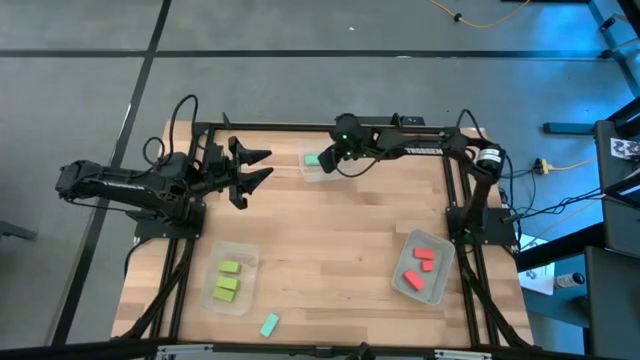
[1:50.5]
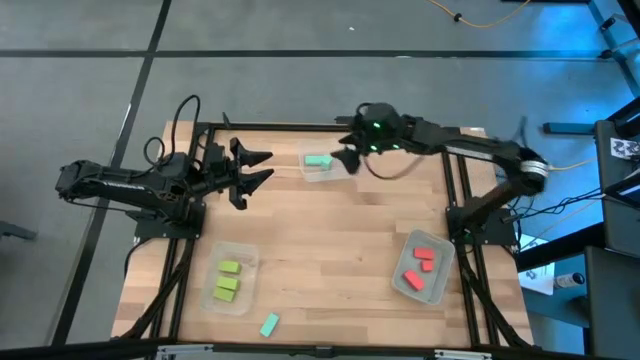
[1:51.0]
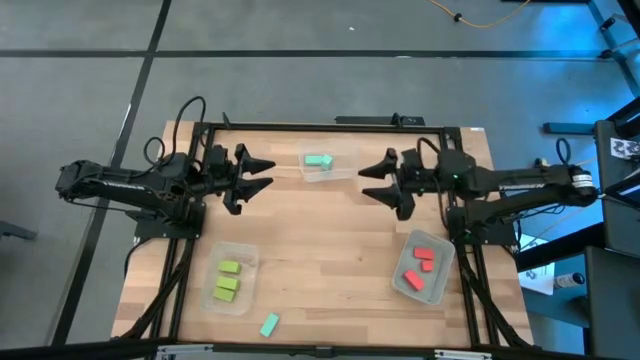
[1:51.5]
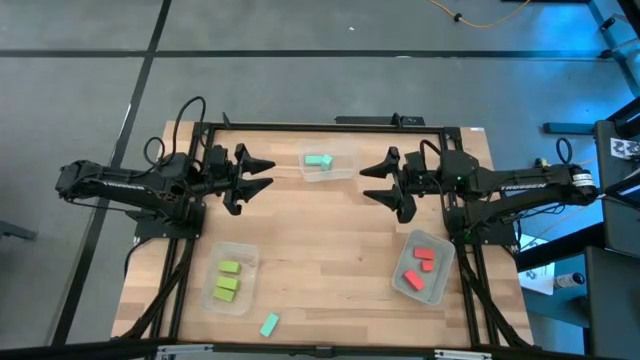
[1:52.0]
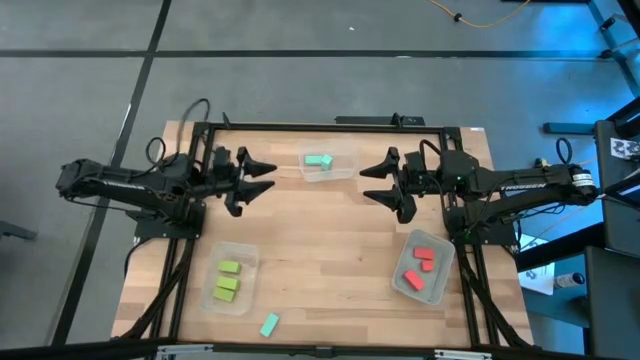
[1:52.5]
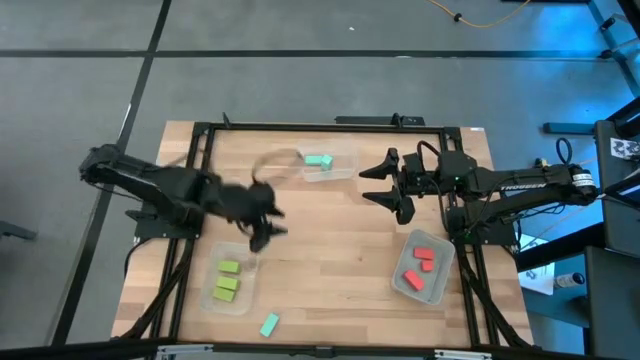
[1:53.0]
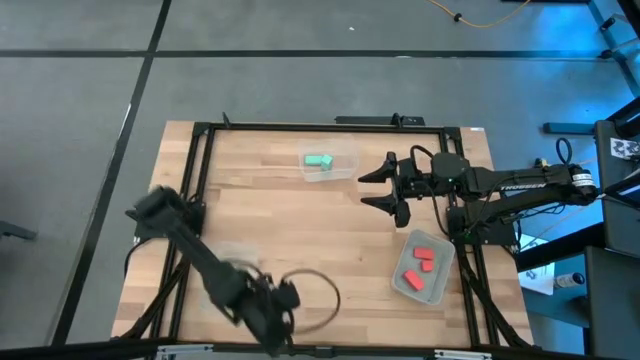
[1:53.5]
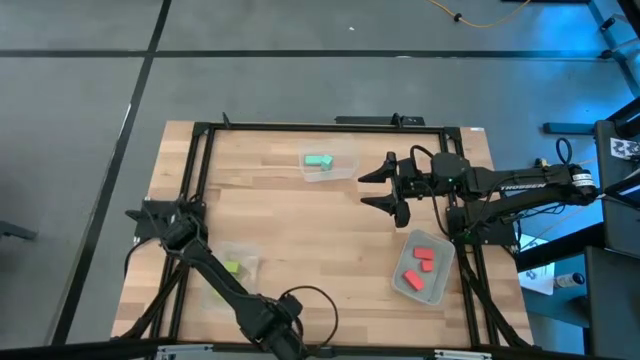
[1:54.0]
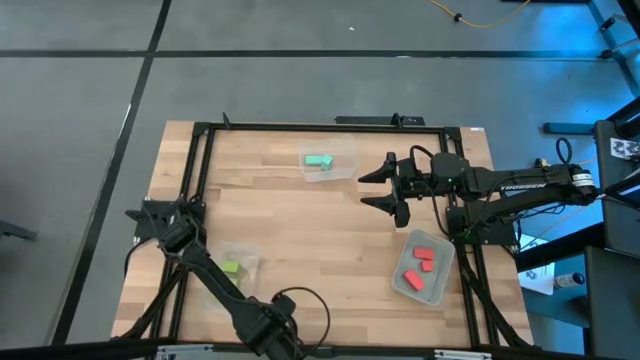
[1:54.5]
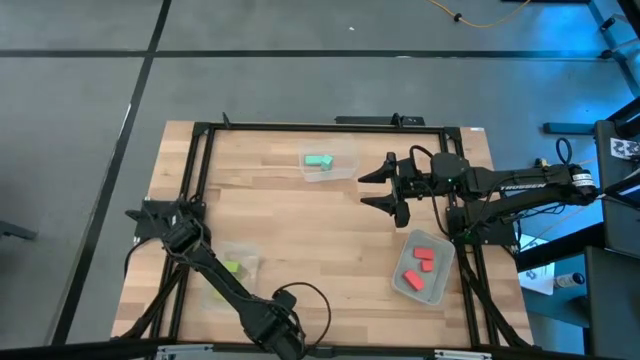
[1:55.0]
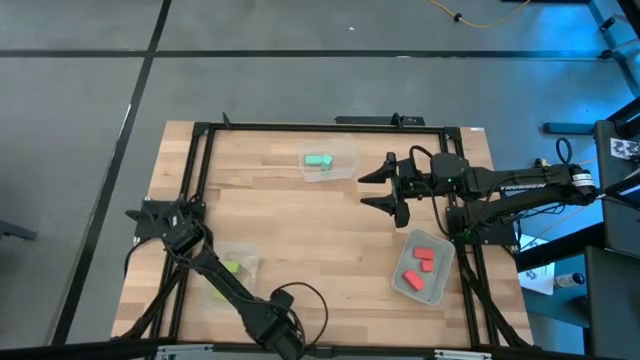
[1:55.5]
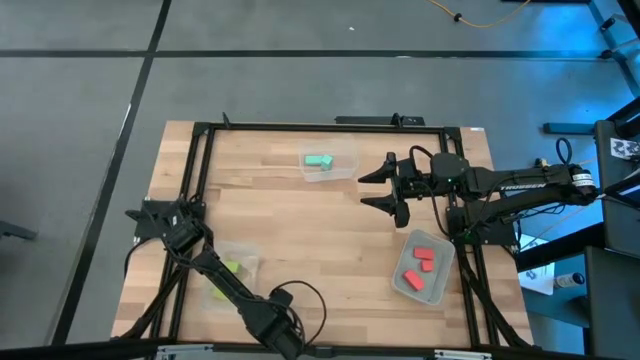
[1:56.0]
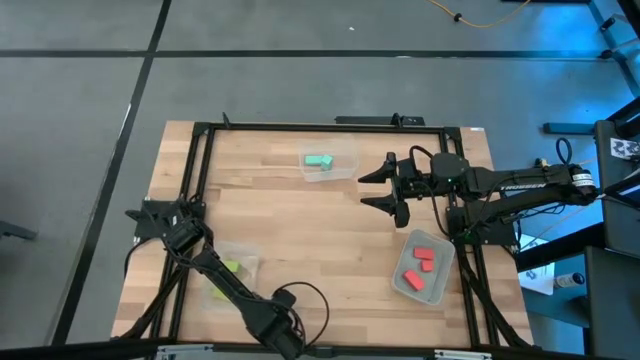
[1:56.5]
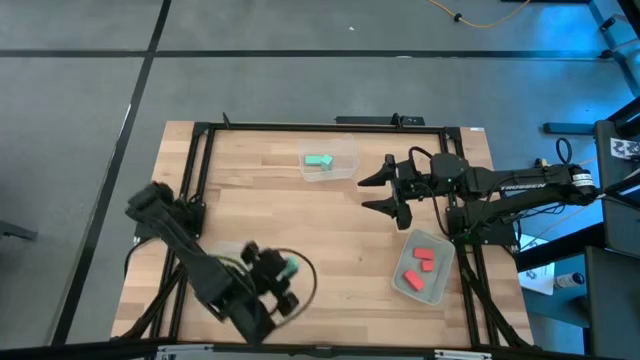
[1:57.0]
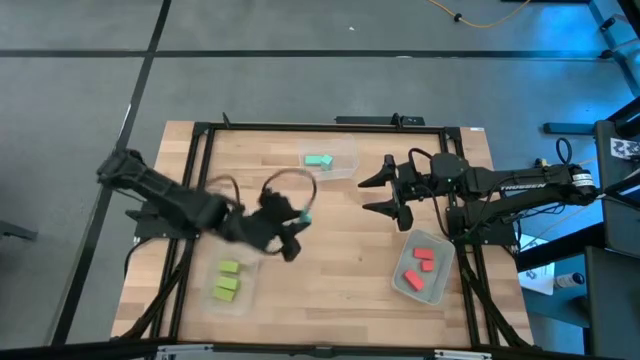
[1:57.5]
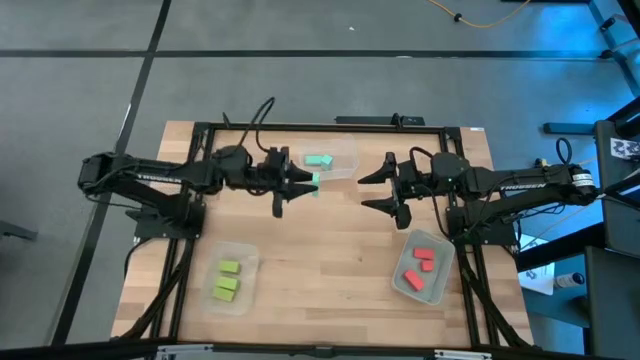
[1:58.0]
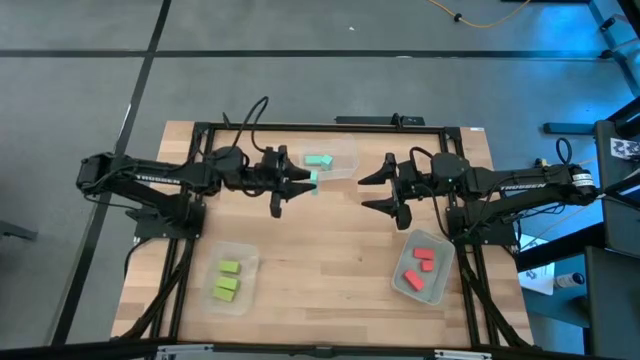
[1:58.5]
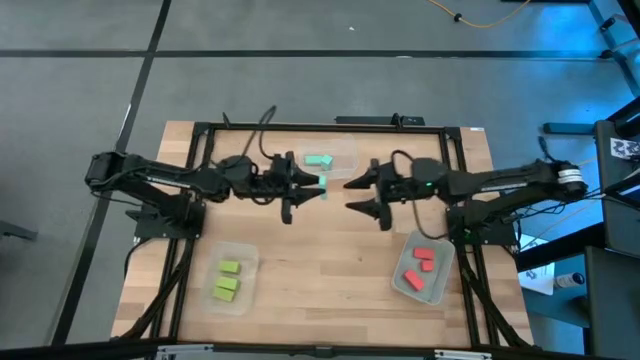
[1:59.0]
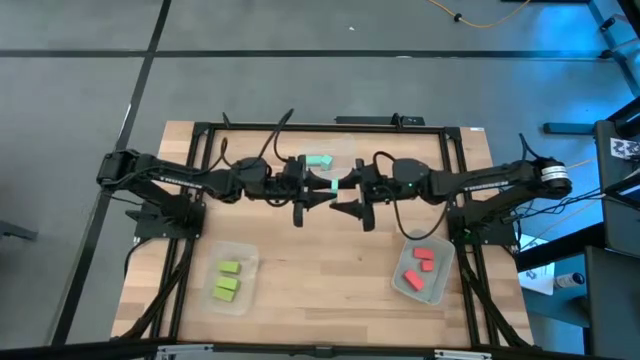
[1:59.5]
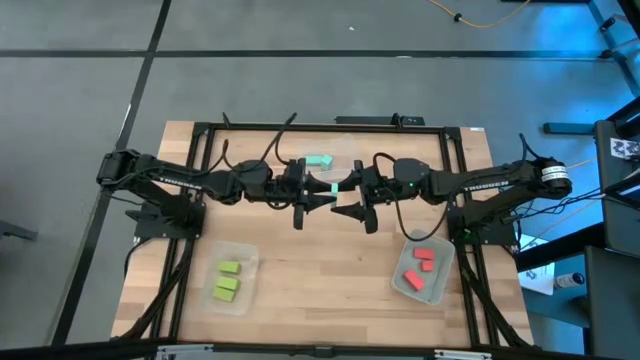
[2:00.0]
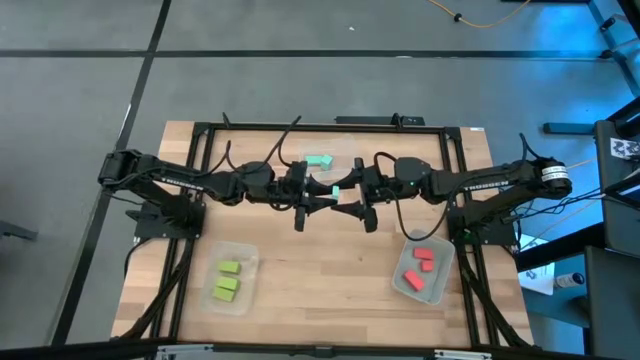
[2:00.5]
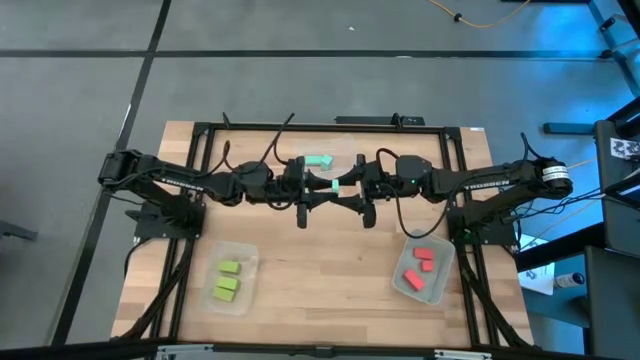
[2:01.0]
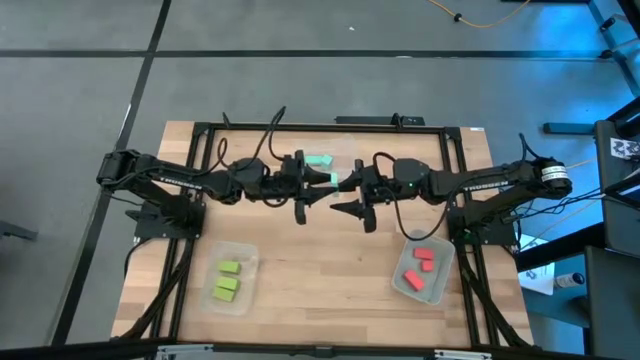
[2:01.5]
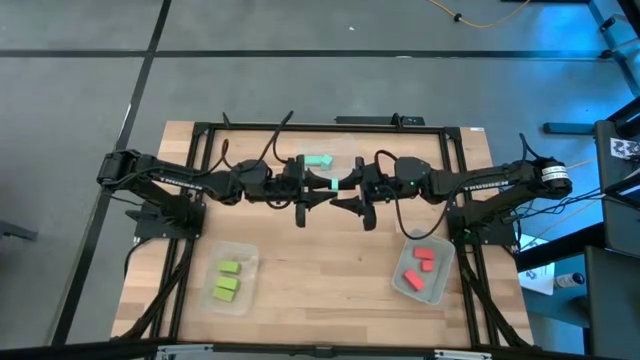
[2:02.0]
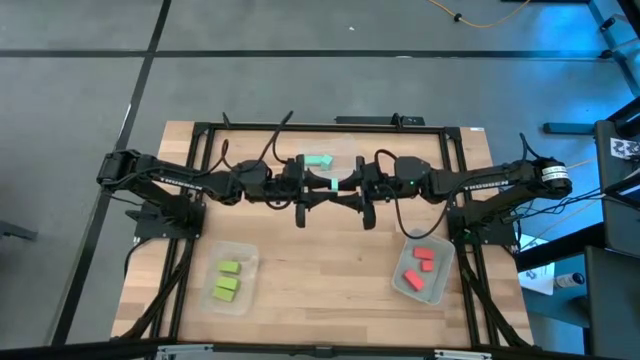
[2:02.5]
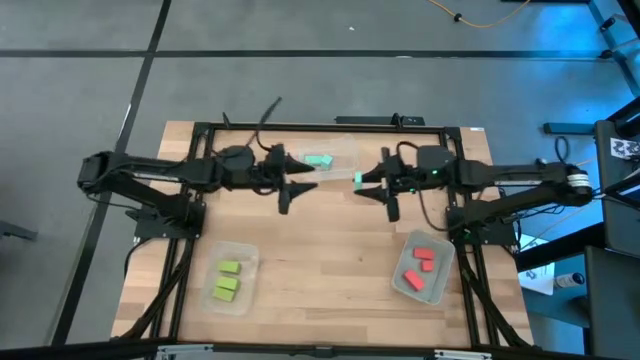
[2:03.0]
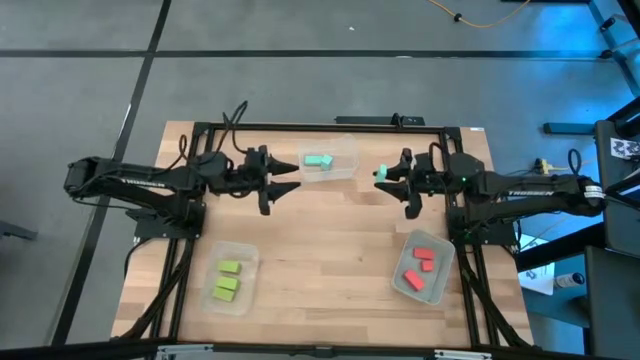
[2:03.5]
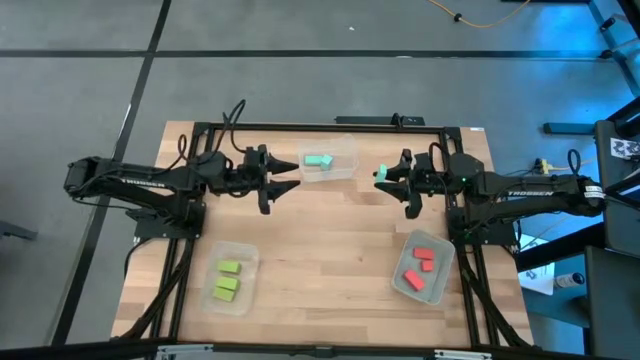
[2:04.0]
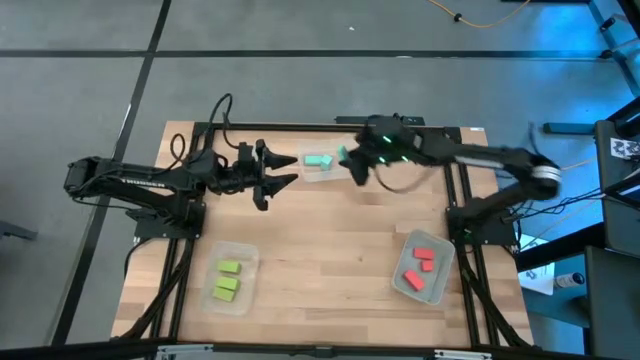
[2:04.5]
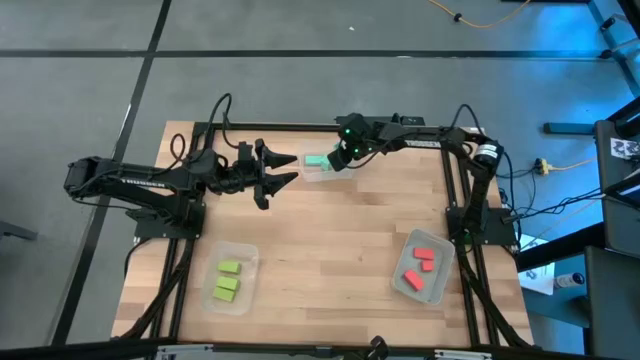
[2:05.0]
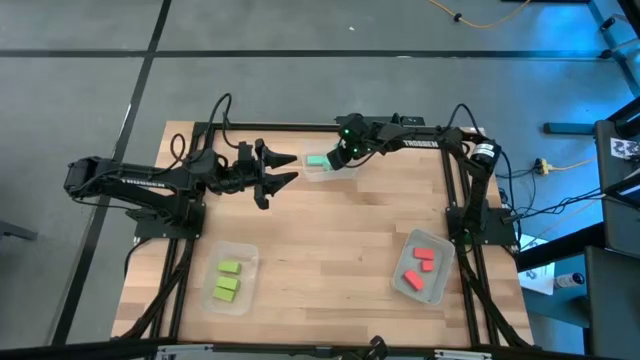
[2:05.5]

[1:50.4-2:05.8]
Task: Sort & place blocks by color
Put the blue block into the top transparent bin

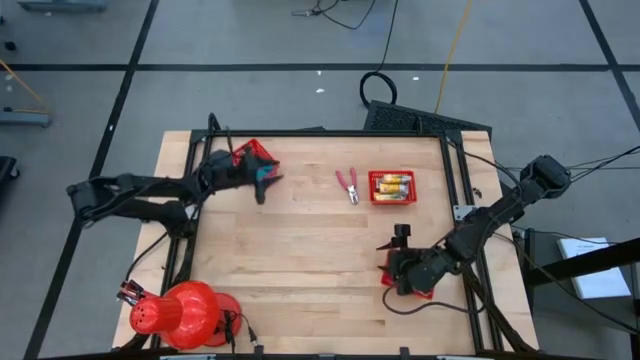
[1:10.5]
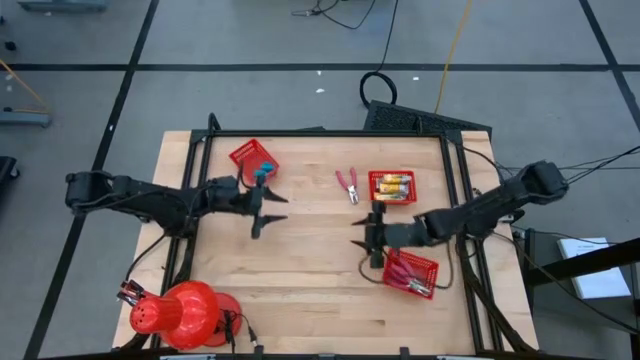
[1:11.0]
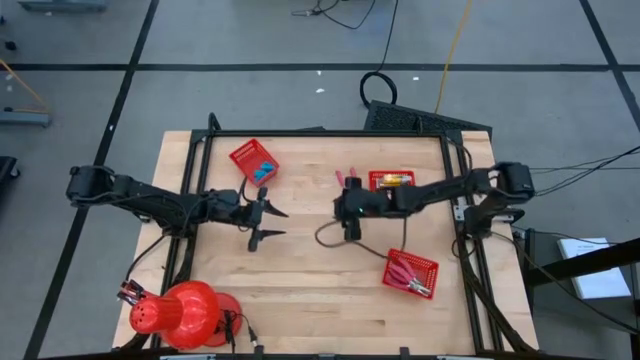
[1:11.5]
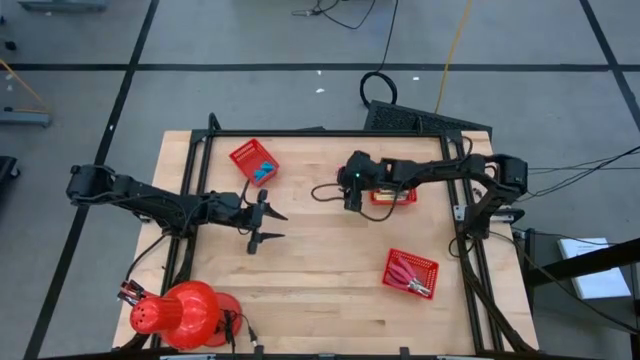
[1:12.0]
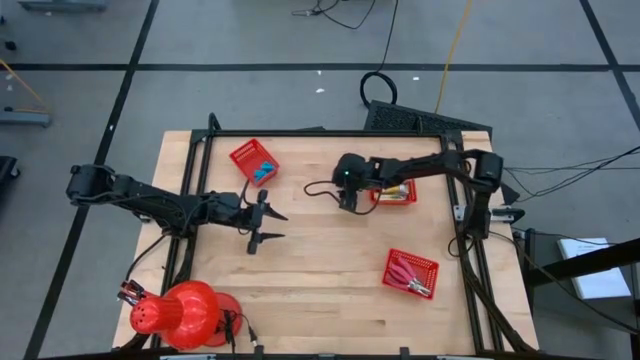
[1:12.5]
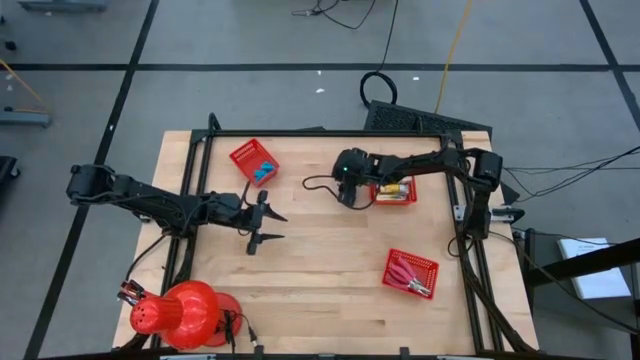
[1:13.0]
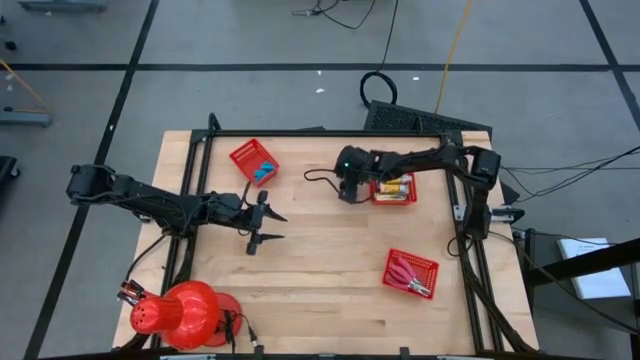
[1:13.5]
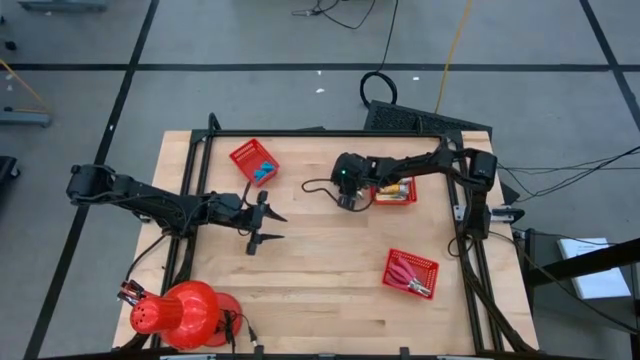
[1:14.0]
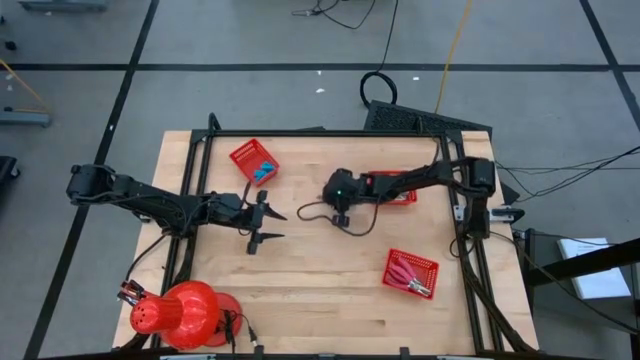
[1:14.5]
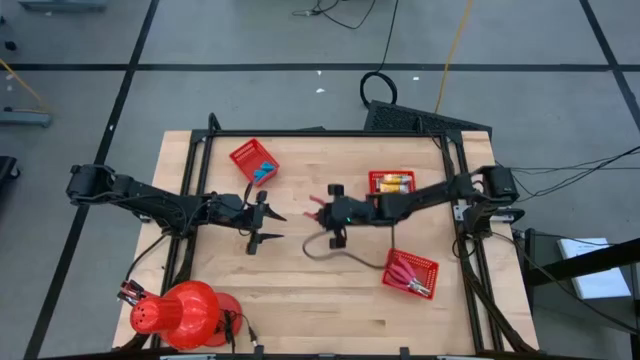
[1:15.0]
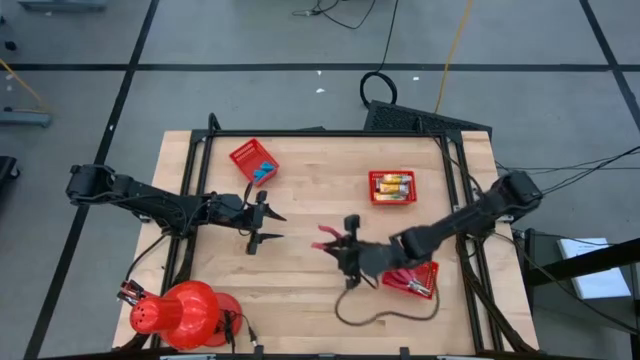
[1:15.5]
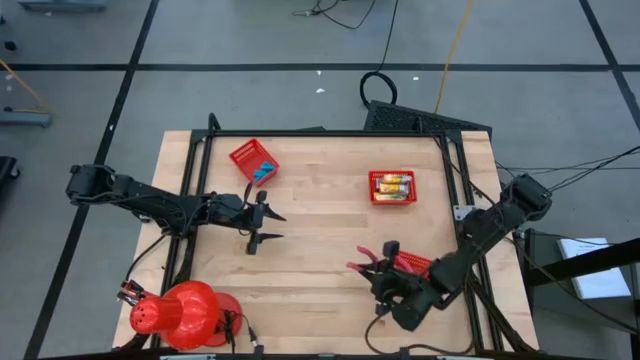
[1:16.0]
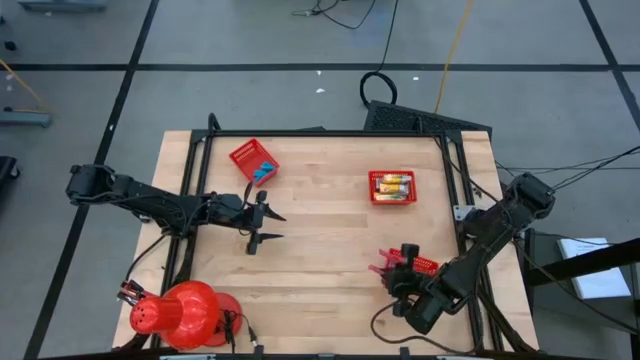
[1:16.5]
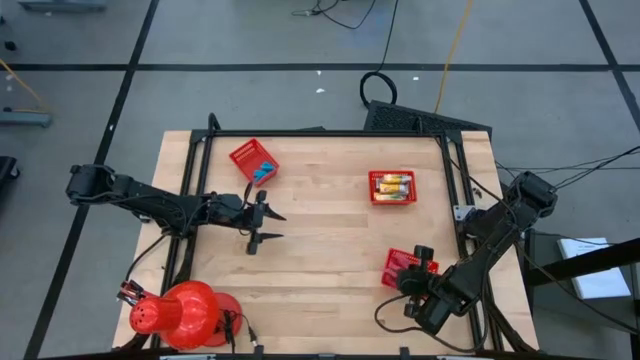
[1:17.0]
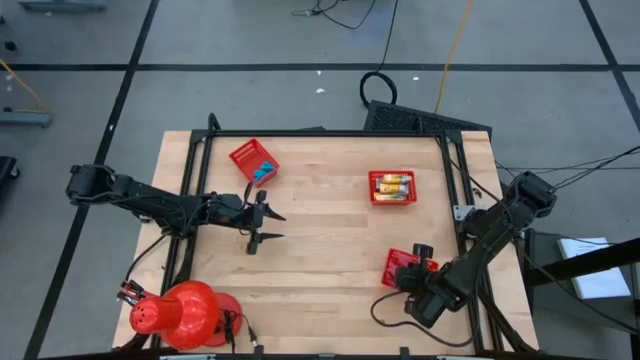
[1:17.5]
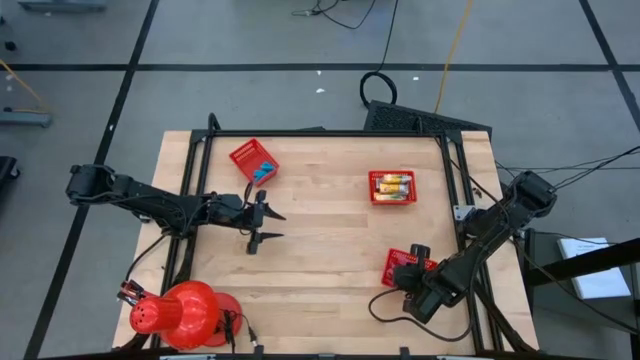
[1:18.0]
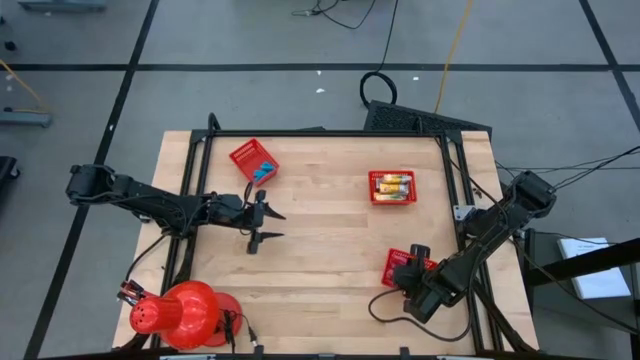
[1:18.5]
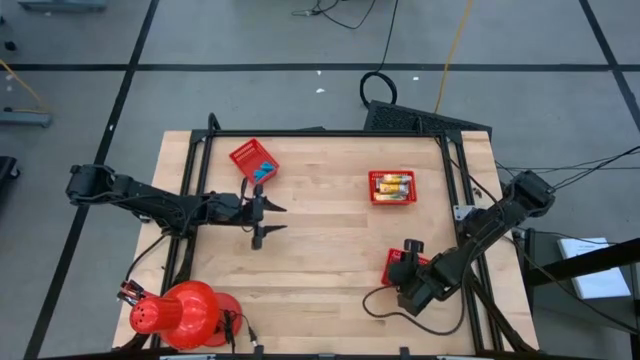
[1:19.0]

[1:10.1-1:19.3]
Task: Pick & Place School Supplies
Put the pink hole puncher into the bottom red bin
